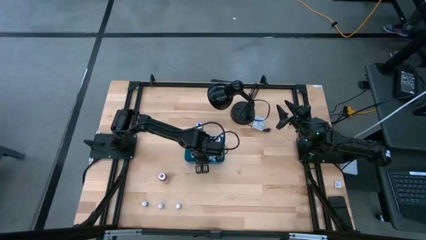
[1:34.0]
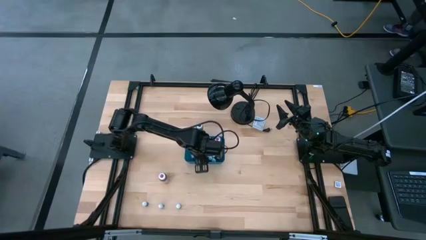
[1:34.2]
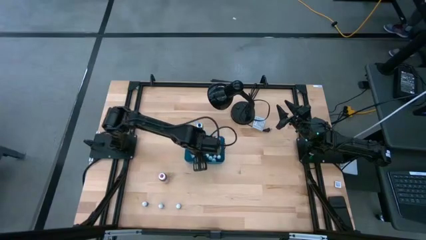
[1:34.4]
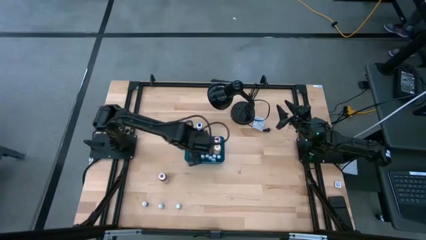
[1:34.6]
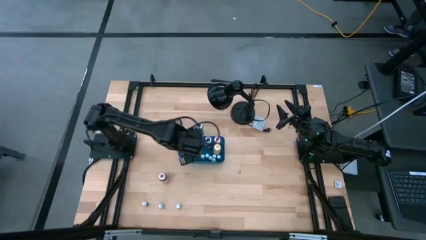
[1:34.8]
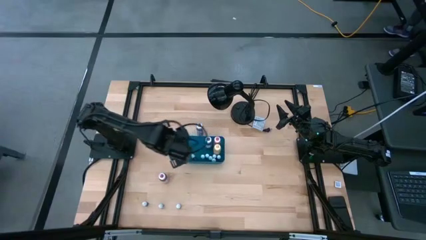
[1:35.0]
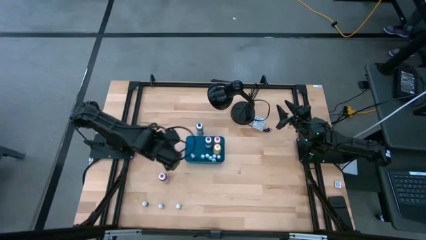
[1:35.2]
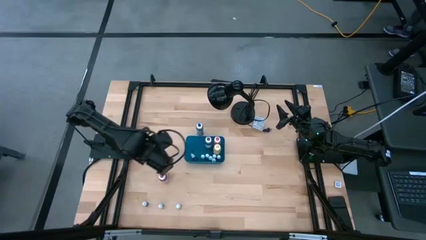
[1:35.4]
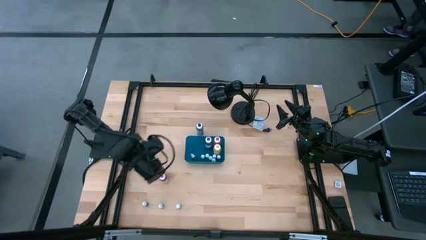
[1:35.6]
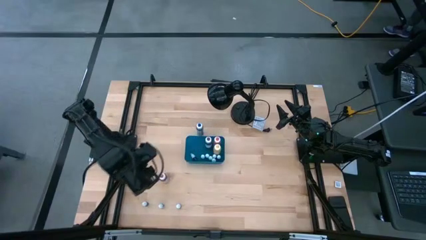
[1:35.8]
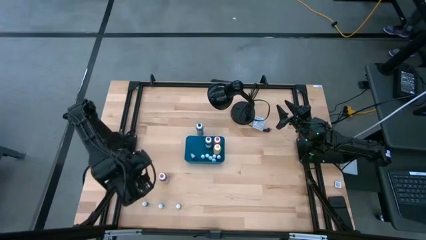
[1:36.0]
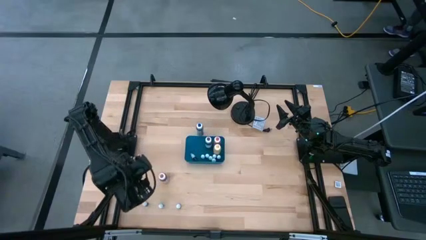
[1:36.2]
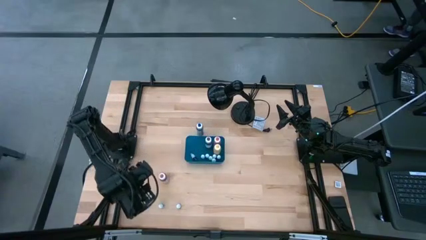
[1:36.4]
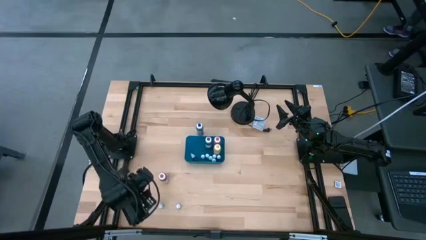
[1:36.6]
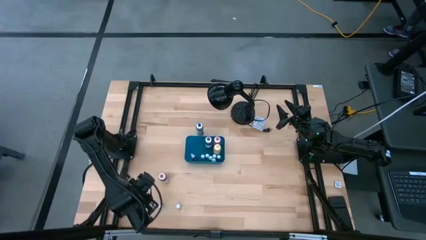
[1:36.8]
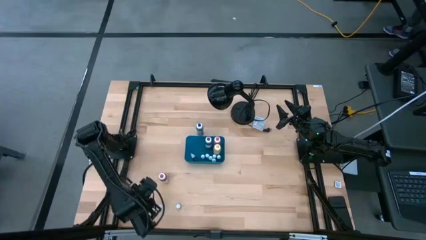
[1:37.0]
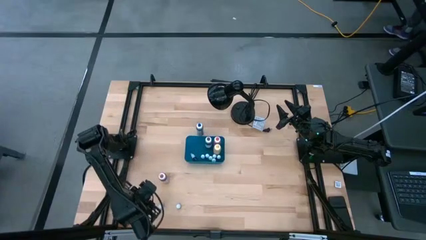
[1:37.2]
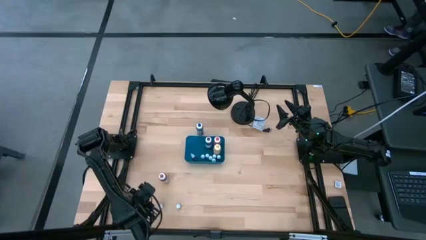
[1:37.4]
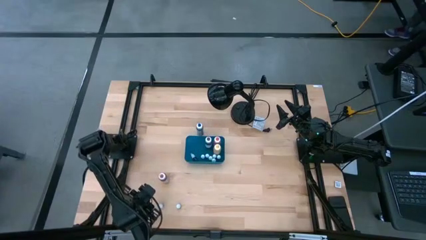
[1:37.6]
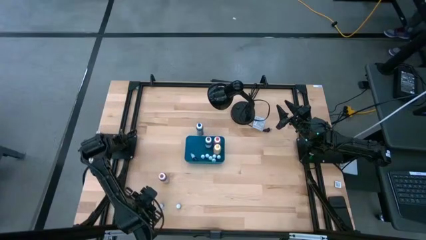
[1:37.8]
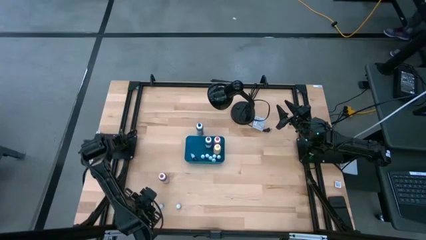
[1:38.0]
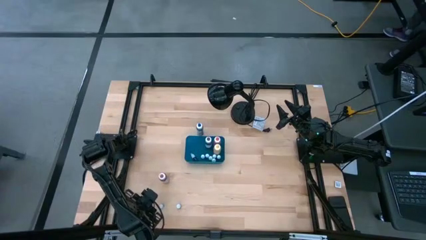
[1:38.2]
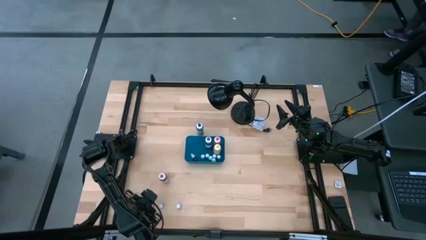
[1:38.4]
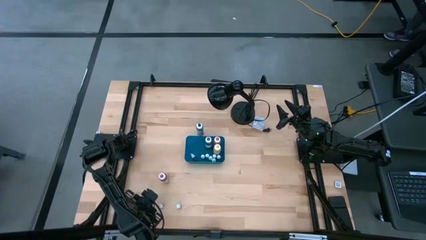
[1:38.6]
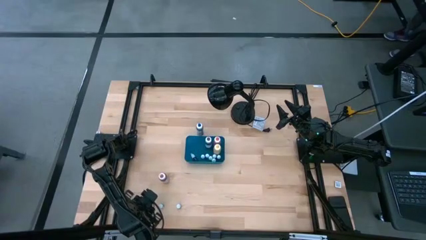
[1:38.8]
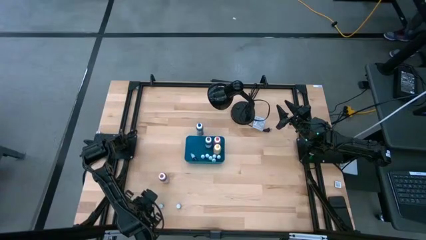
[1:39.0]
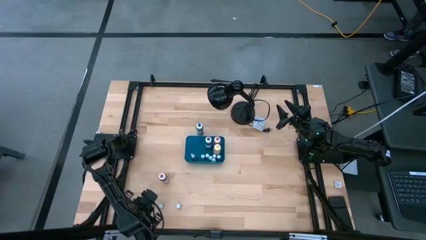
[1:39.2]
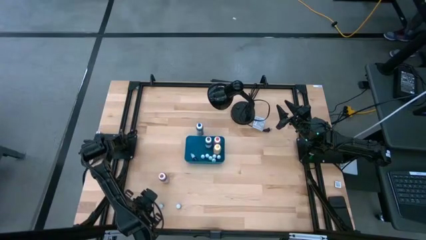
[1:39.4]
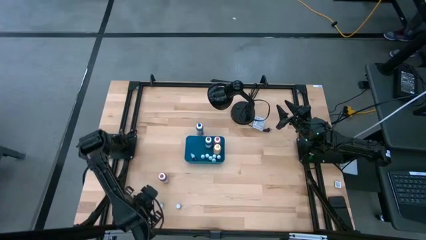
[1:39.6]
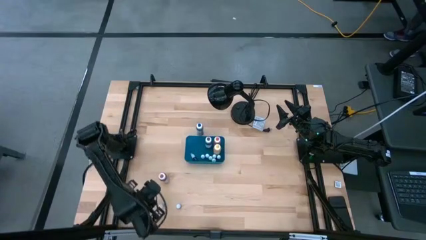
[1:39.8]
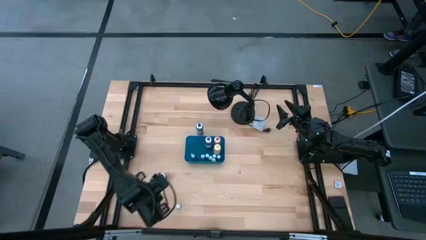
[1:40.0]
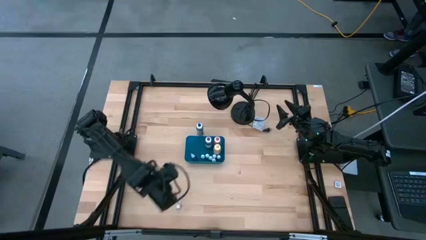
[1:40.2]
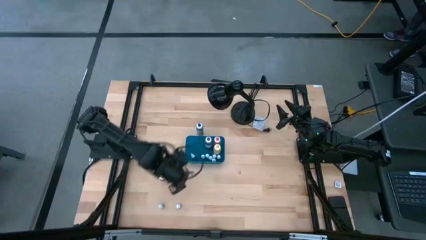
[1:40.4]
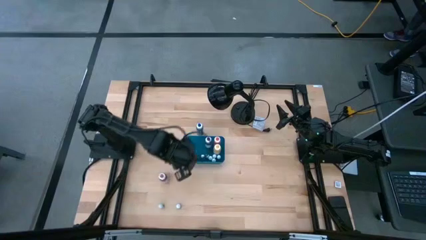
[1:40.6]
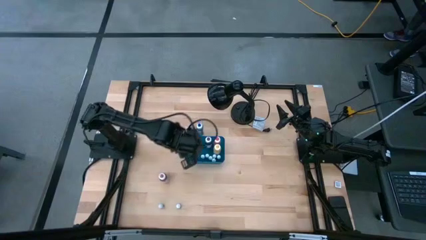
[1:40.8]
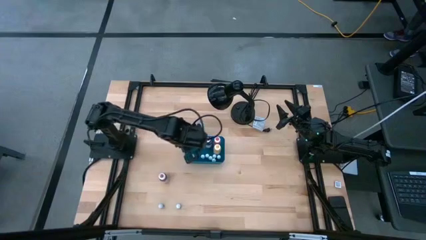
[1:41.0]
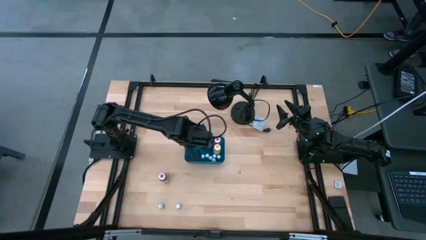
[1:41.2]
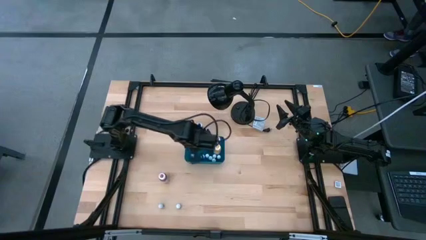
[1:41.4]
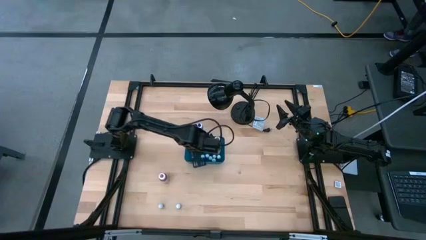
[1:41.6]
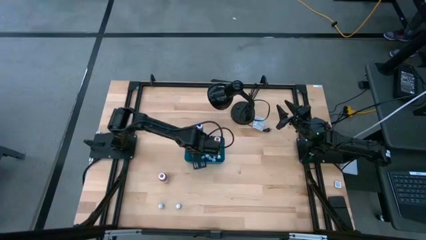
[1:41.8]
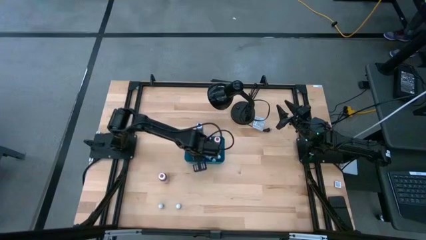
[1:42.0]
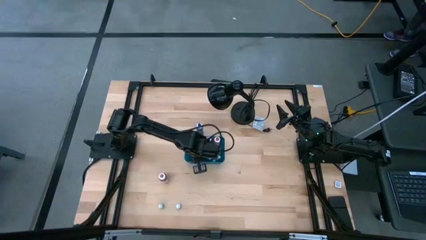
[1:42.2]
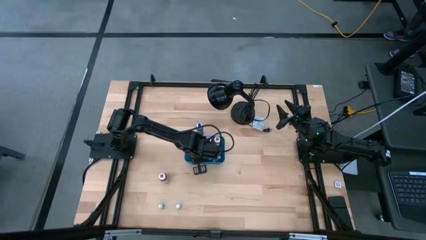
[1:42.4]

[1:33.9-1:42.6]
Task: Pick & Place food coloring
Put the small dark blue food coloring bottle into the blue bin

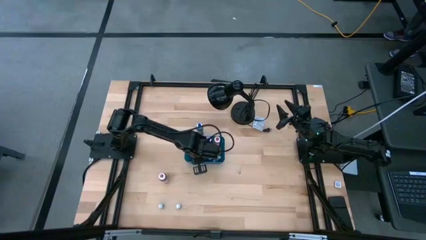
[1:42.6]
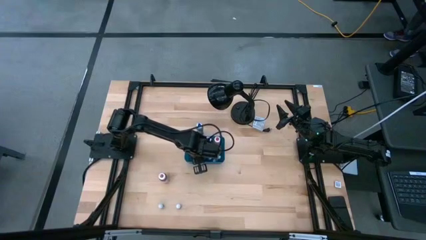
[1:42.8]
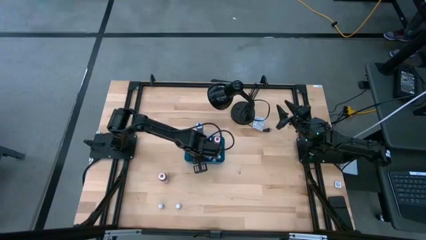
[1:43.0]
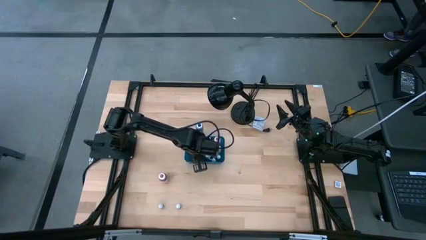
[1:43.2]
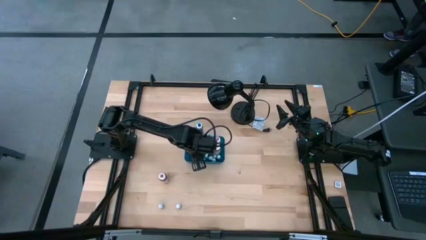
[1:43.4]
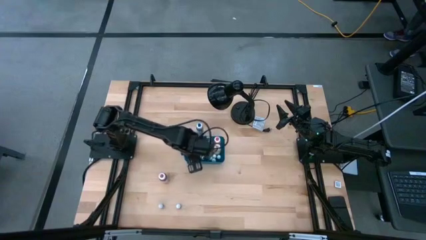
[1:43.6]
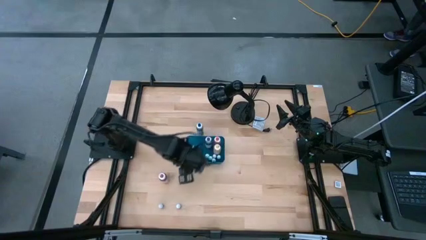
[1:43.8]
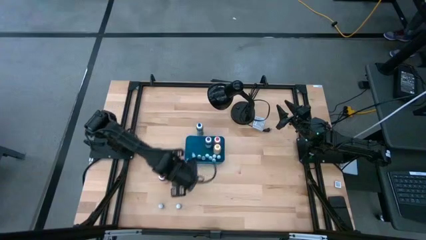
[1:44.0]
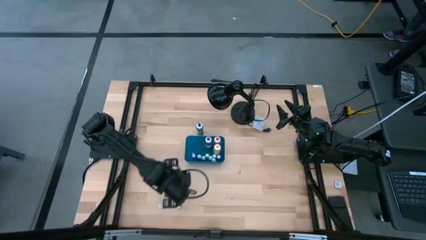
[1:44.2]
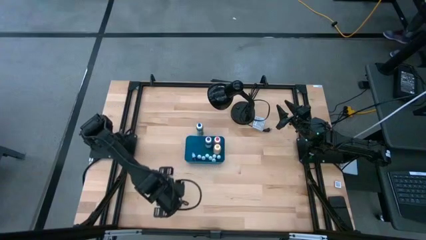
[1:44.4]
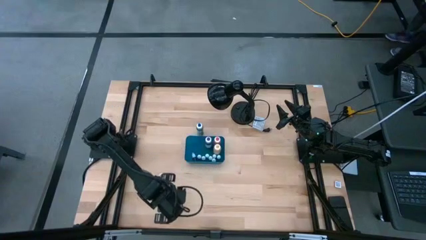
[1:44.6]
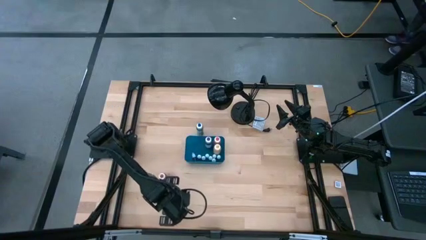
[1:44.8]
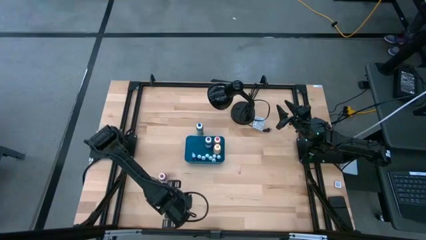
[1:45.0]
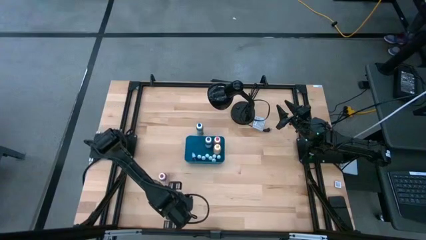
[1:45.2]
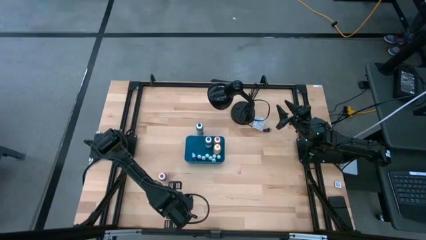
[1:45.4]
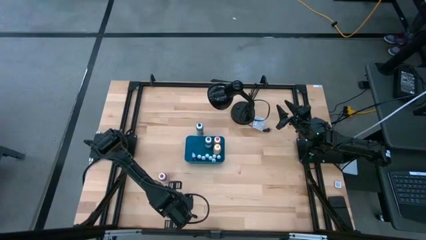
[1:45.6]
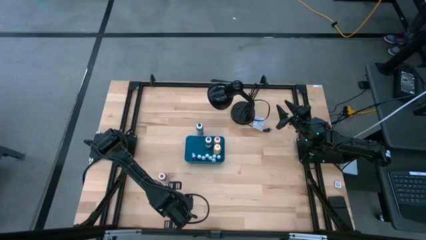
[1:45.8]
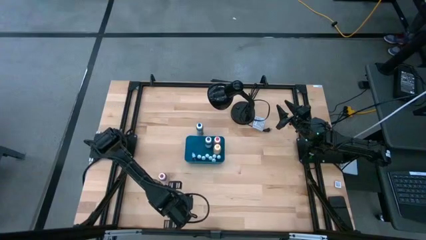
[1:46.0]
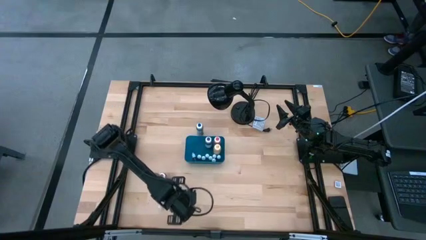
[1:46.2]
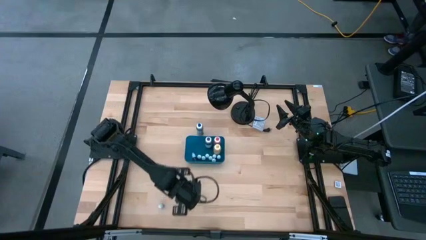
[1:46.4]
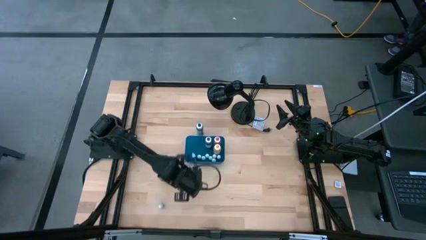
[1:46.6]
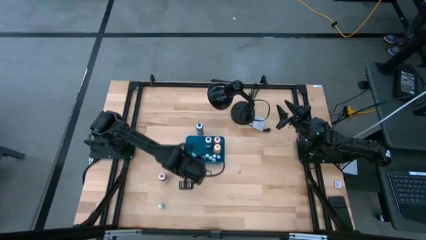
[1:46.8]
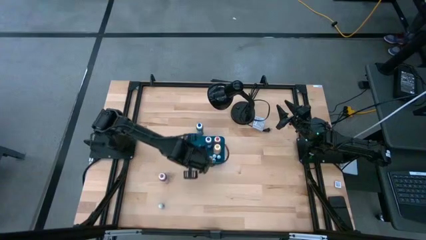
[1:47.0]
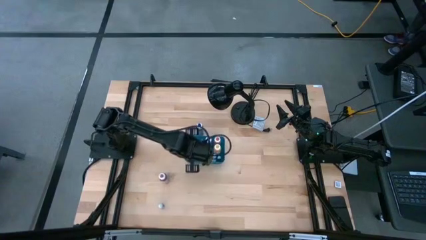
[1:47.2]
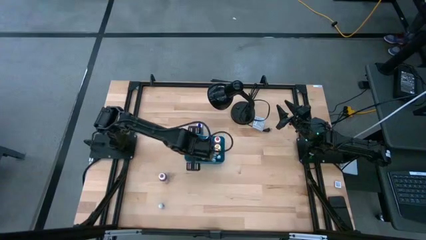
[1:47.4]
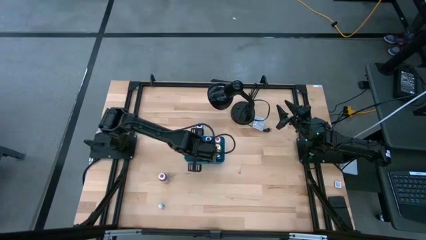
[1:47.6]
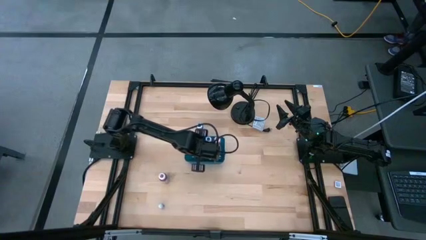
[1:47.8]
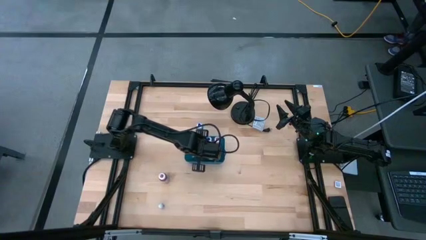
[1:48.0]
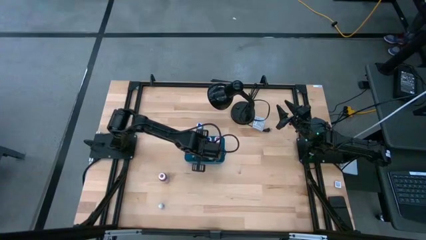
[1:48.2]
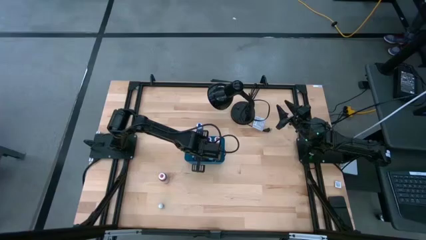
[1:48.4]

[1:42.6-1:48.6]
Put the small dark red food coloring bottle into the blue bin

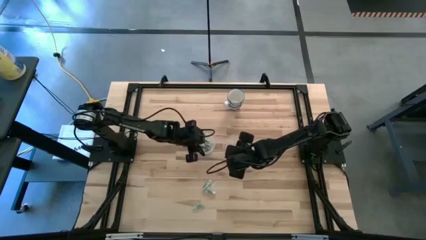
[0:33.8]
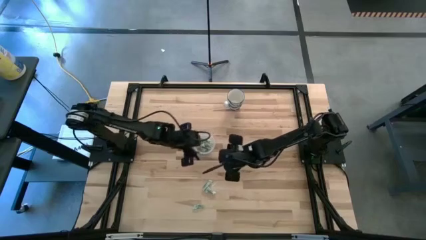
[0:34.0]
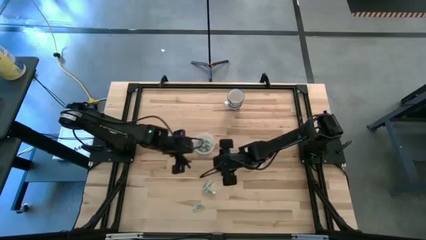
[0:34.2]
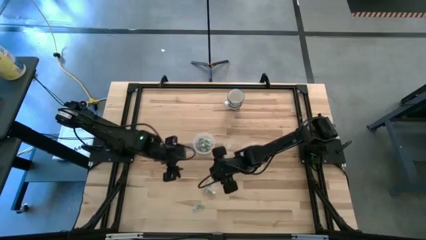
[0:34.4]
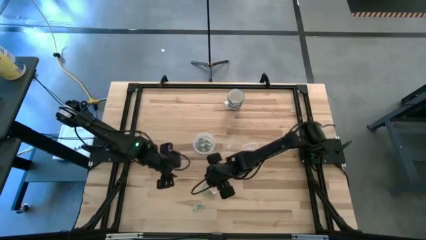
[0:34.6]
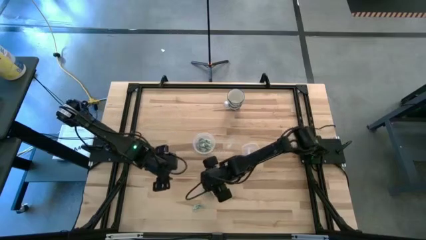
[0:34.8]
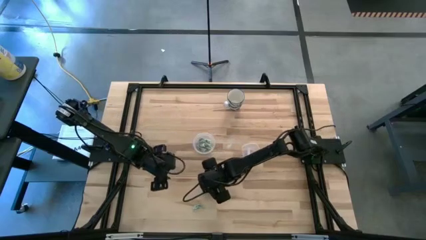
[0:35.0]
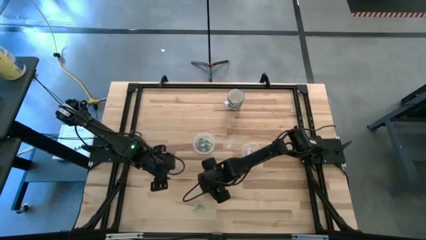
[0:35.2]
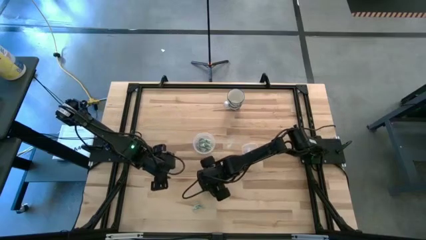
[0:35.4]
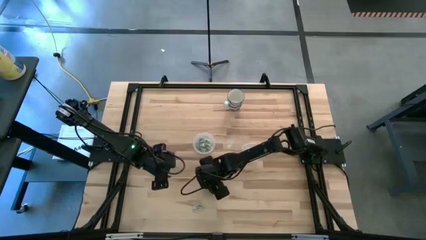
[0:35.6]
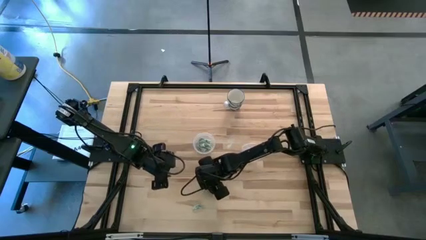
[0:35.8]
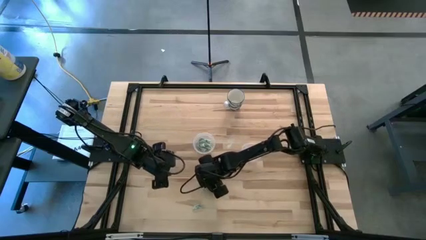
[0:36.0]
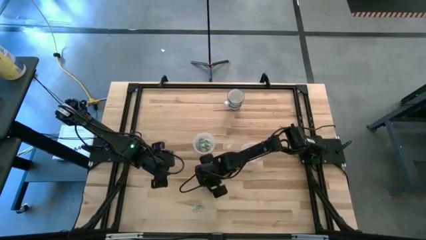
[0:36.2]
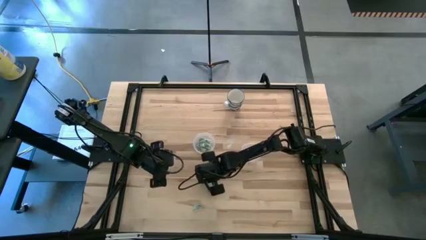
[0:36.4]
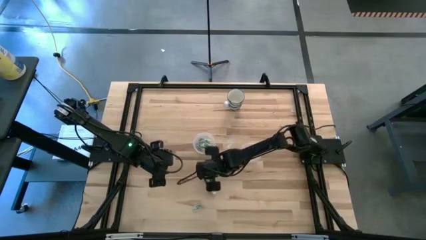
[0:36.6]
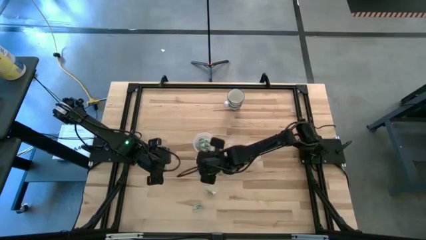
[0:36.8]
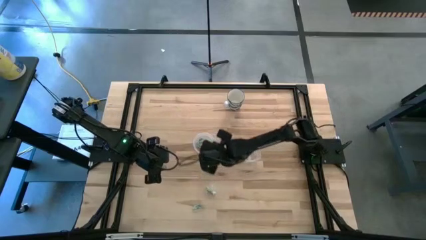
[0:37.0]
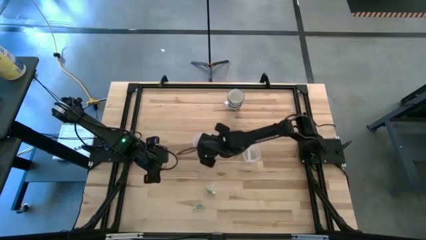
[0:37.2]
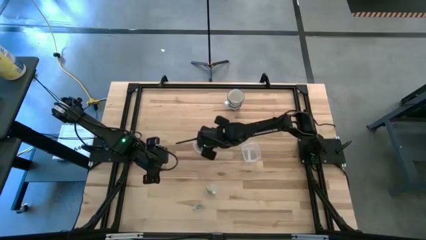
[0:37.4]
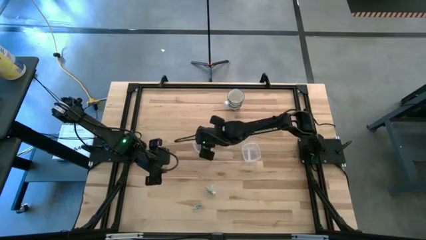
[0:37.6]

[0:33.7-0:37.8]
Task: Pick and place Stevia / Truvia into bins
Put the green stevia packet into the left transparent container
